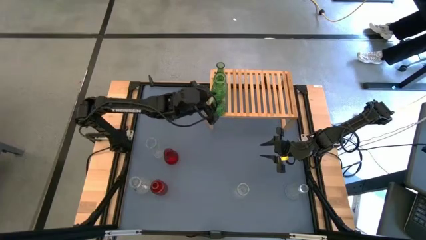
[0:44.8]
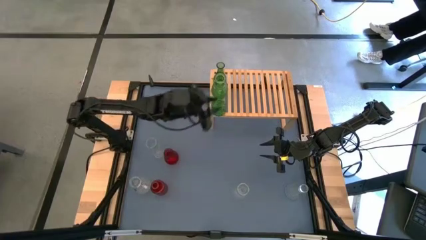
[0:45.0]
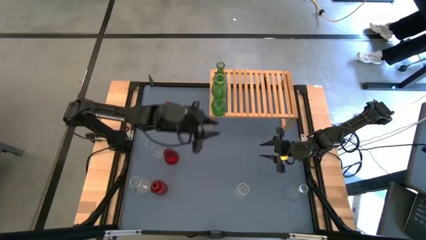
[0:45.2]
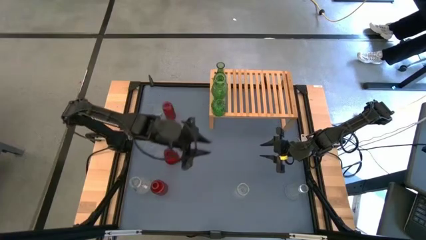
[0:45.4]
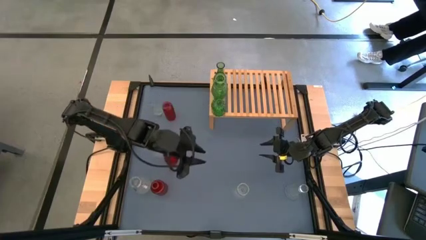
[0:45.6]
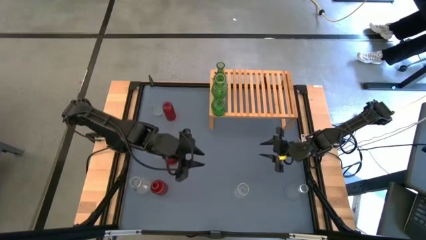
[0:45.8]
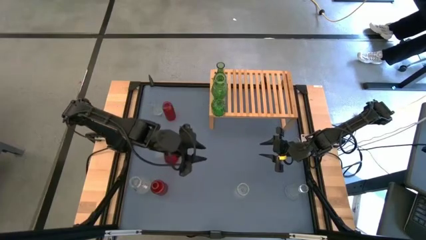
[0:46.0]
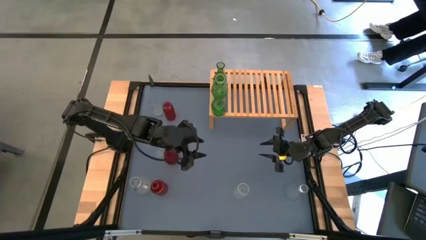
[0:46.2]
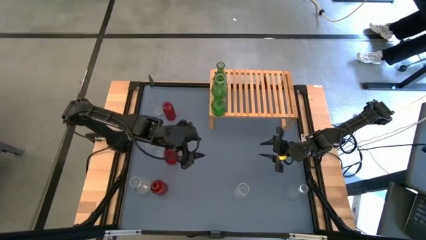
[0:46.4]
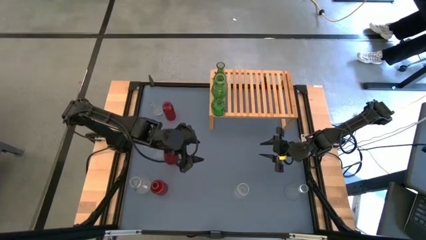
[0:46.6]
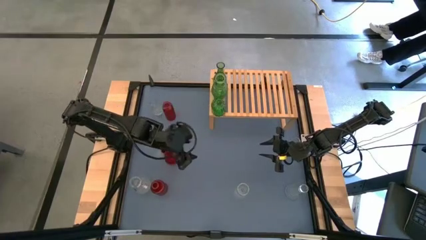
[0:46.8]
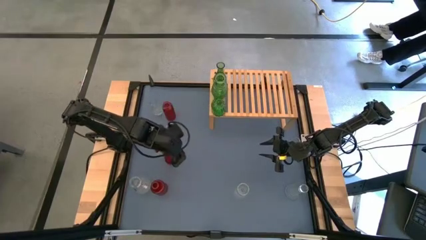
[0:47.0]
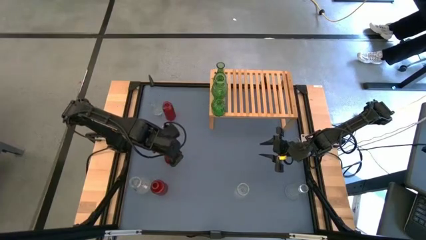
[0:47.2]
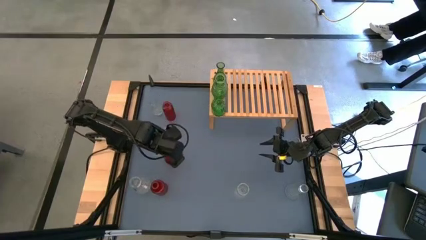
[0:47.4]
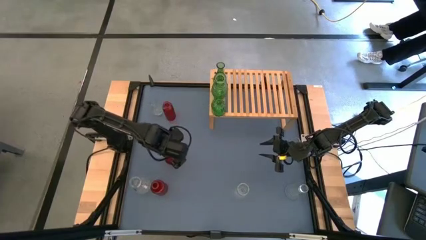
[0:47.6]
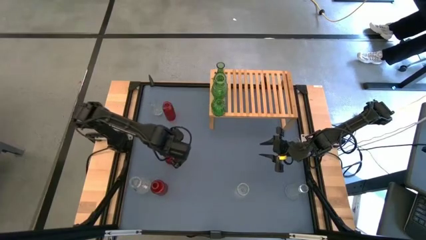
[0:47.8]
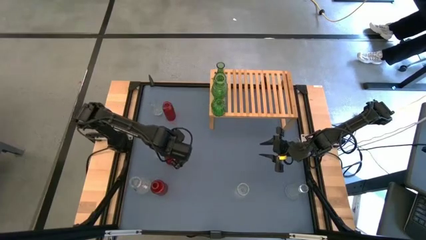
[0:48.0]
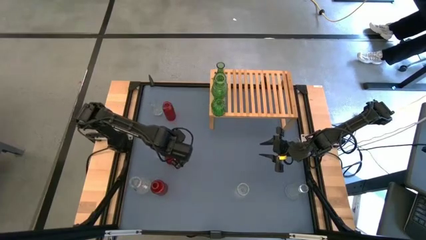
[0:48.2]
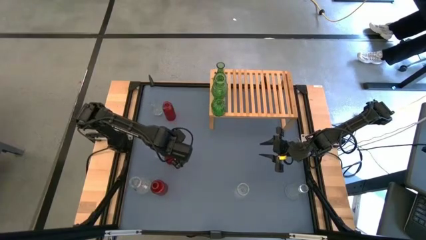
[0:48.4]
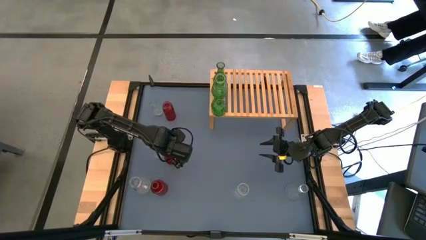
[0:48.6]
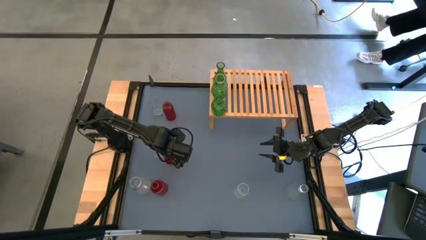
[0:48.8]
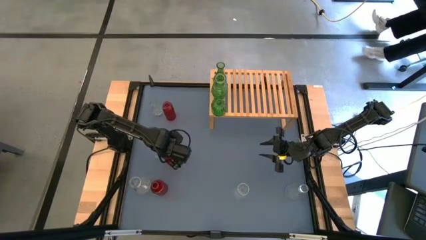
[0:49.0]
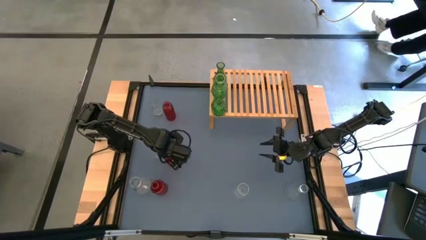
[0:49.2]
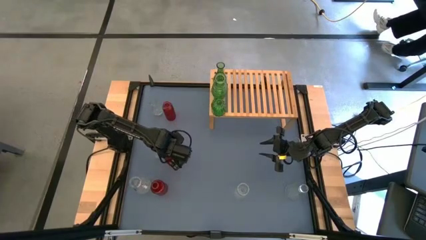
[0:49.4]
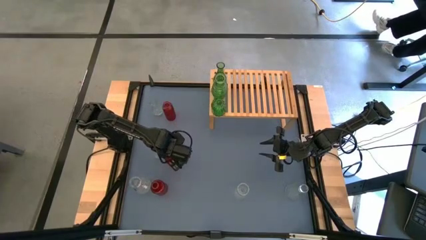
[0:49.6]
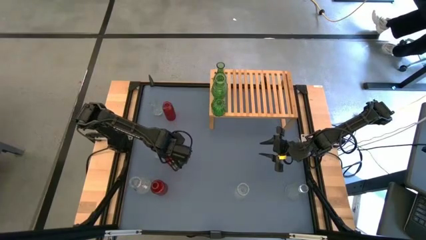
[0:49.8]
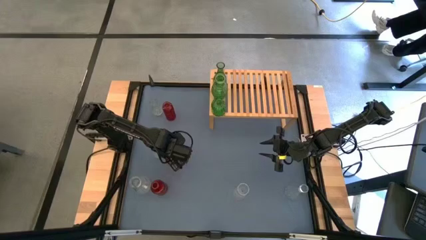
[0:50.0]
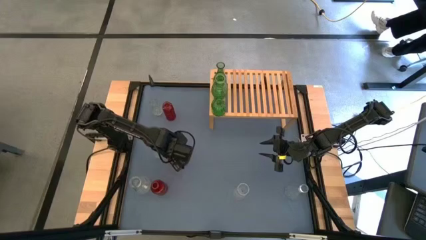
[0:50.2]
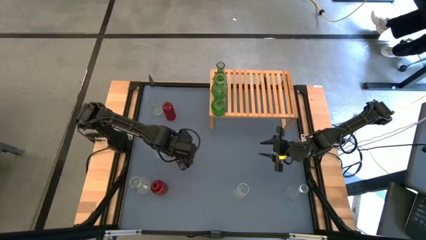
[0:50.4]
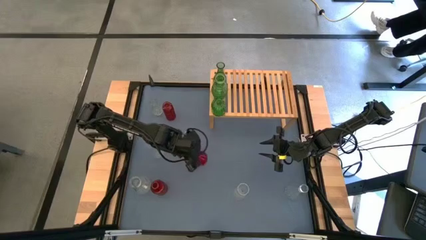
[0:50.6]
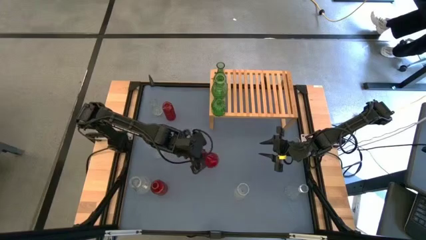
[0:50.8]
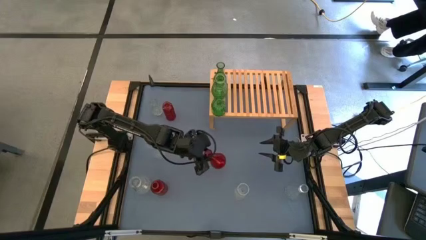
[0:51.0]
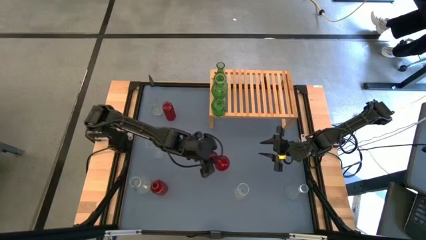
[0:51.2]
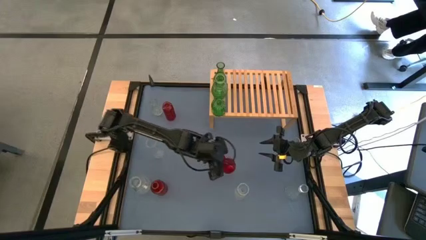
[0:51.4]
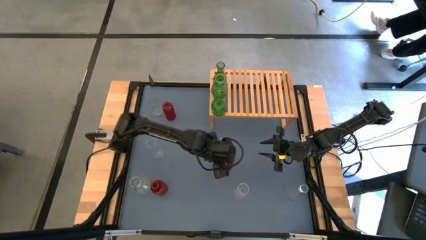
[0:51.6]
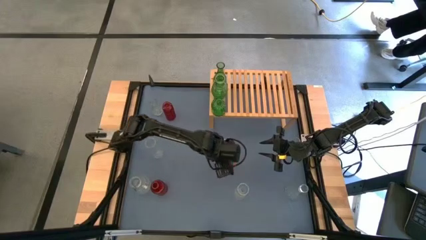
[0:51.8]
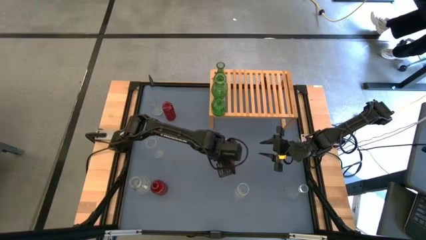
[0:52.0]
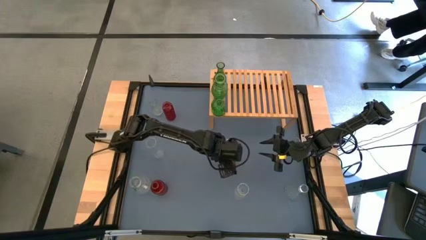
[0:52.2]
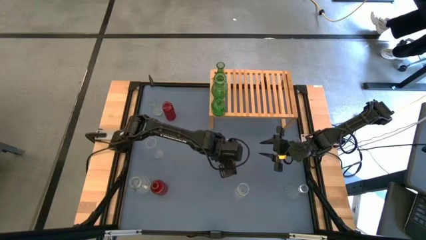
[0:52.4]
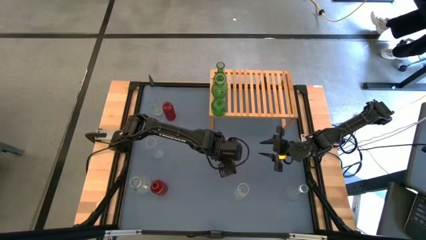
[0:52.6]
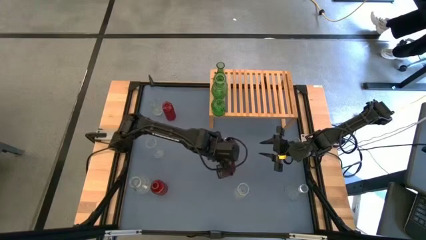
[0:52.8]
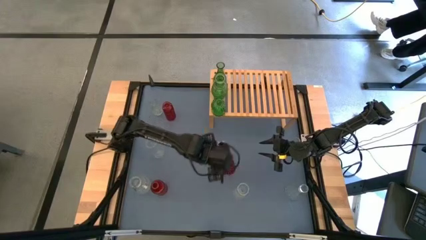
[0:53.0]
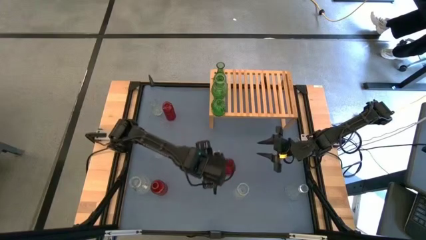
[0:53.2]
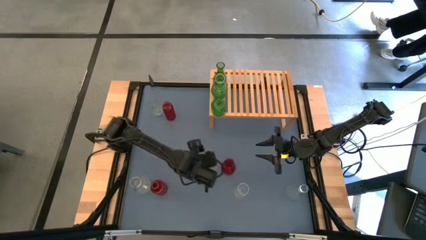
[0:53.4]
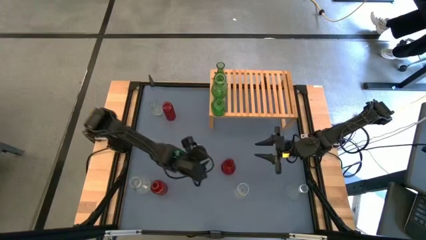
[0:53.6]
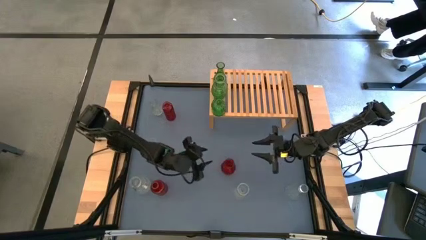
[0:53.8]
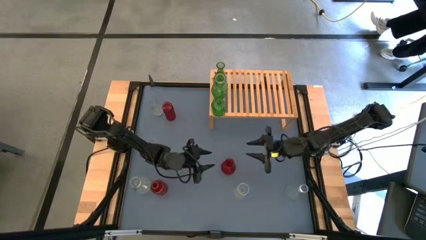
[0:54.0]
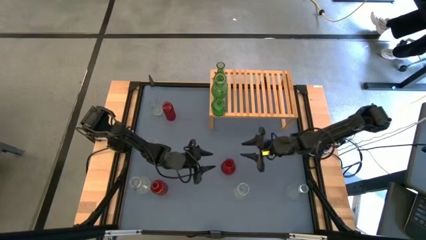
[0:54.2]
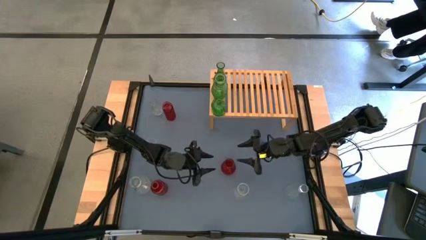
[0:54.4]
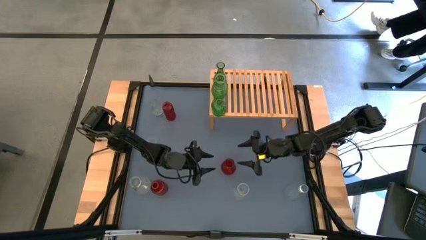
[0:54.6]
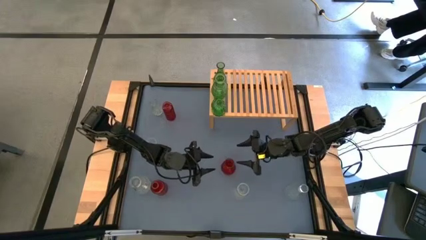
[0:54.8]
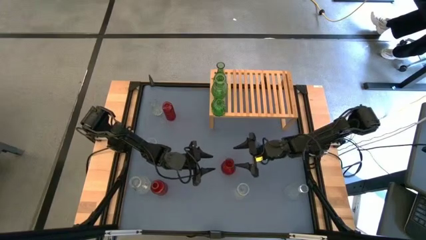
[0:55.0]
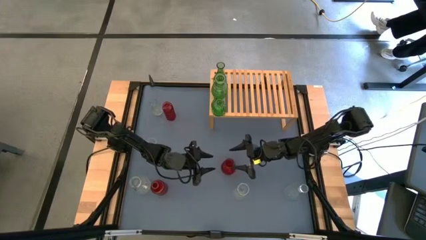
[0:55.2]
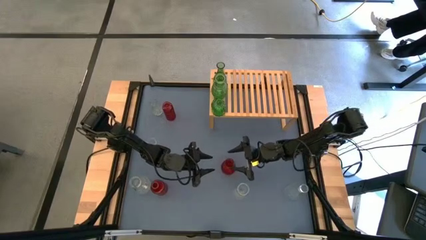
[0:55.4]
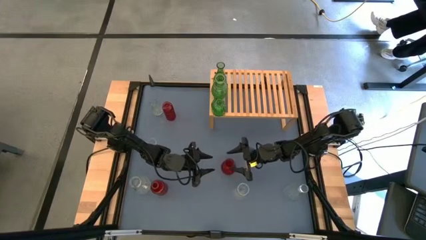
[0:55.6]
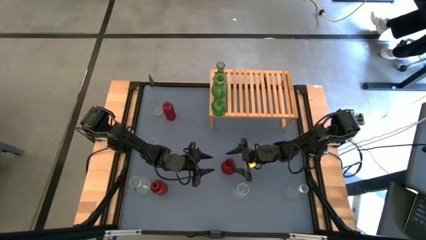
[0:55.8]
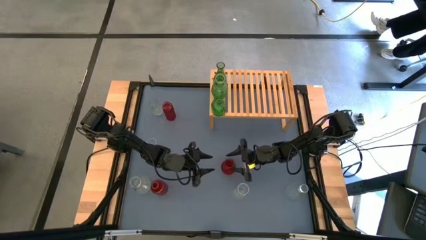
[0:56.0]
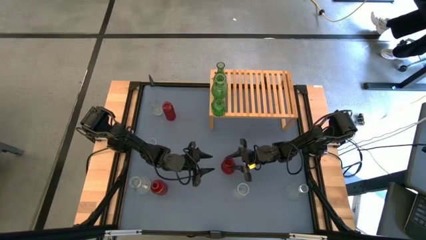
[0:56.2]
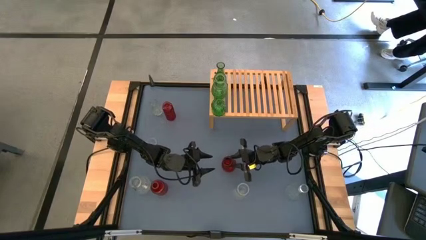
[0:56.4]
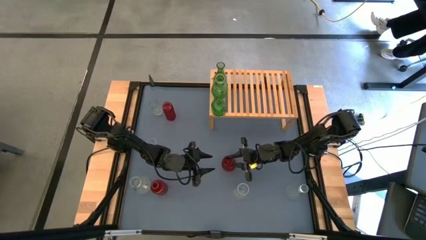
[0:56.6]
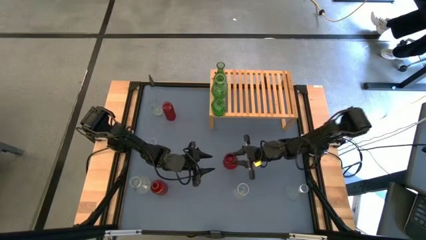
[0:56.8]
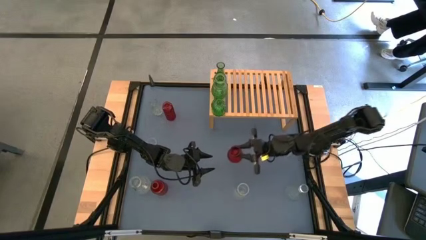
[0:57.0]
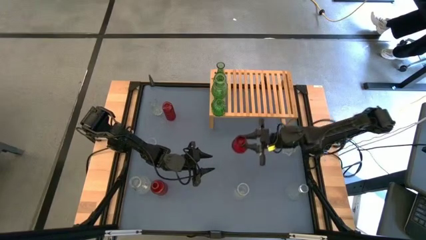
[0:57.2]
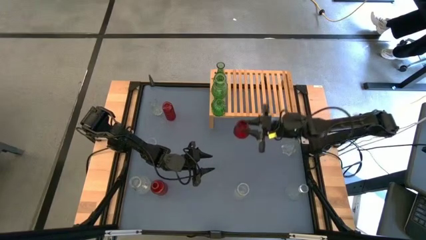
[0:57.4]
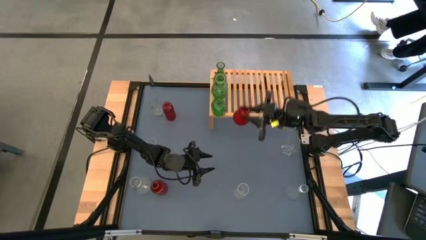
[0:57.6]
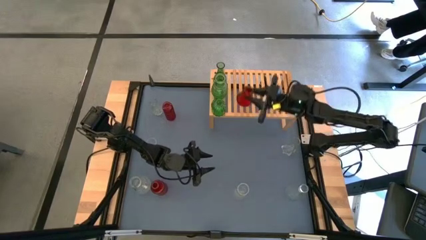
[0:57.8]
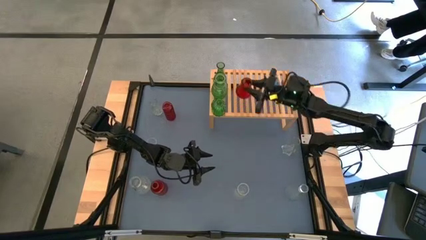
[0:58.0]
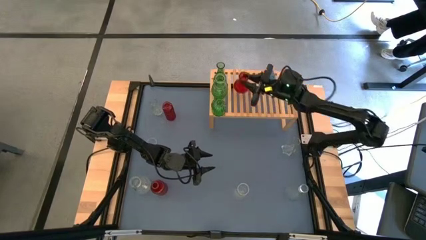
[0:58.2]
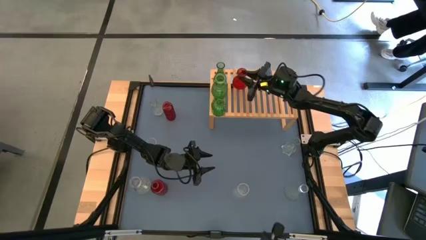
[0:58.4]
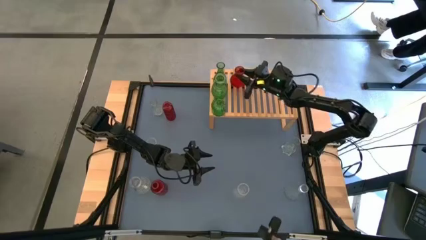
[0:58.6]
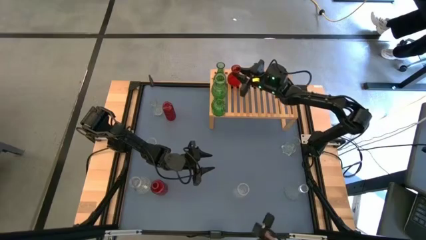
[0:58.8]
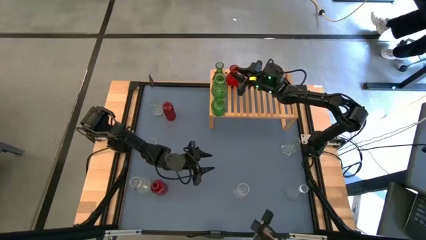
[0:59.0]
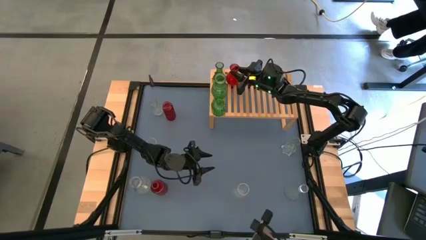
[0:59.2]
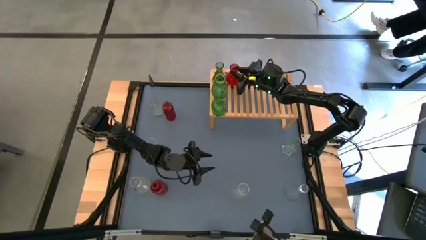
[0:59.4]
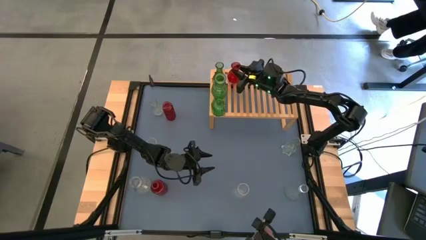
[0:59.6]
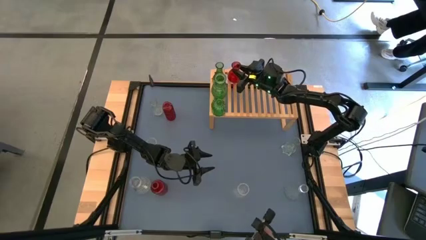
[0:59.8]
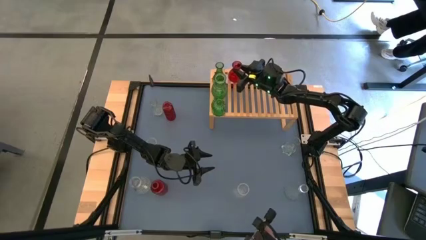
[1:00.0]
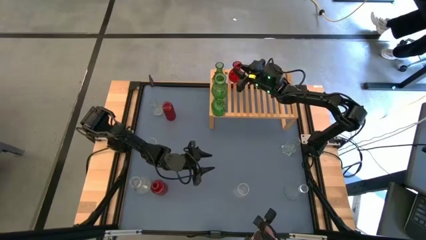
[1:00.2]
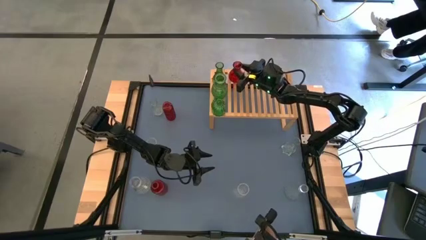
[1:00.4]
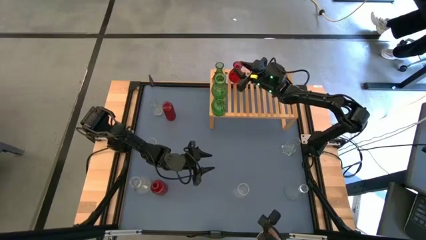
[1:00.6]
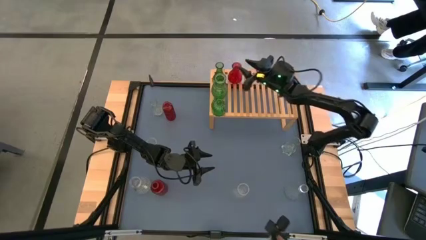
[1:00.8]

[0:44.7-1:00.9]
Task: sort vases onto shelf
Put the center red vase on the shelf
